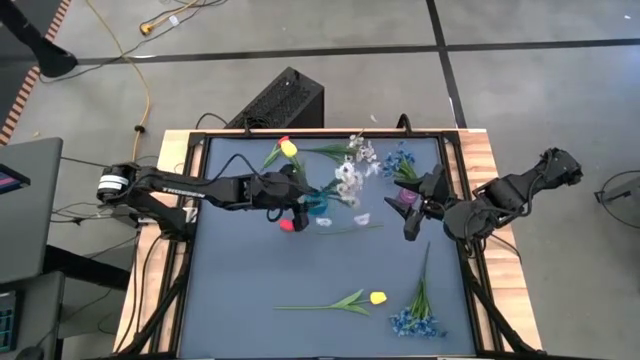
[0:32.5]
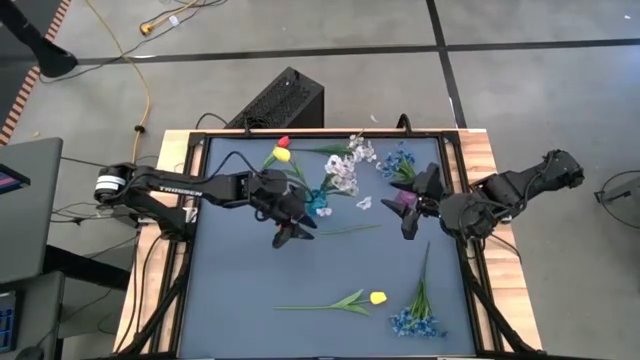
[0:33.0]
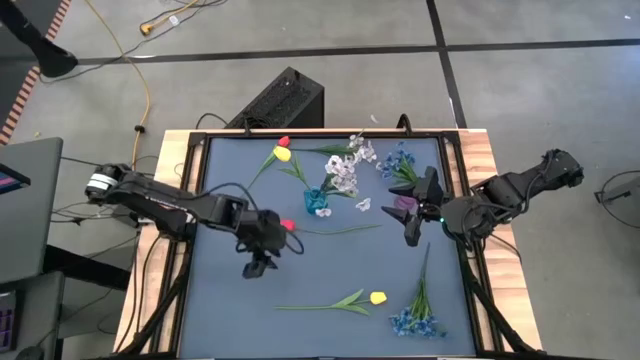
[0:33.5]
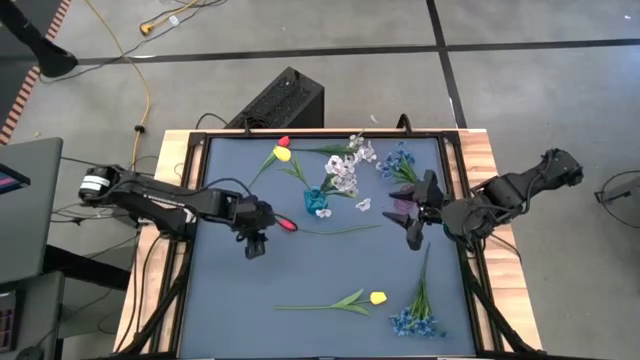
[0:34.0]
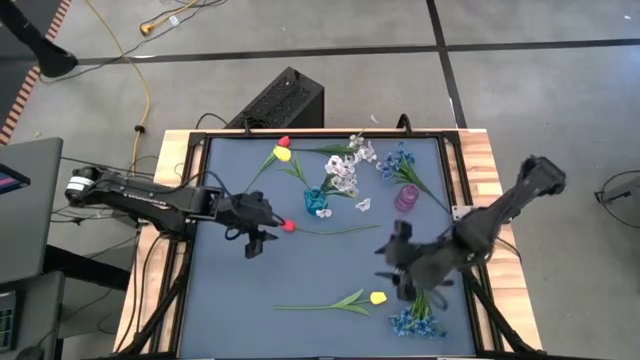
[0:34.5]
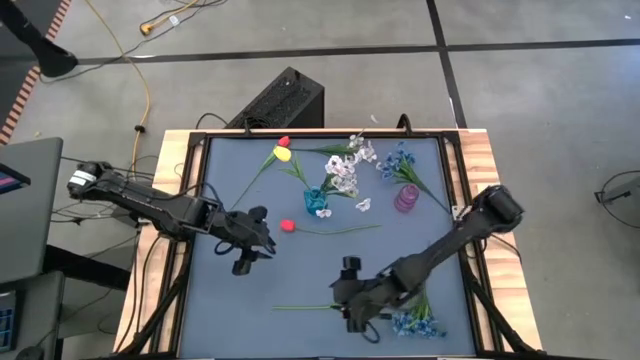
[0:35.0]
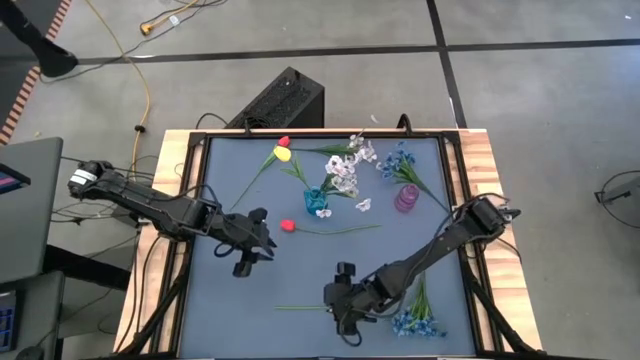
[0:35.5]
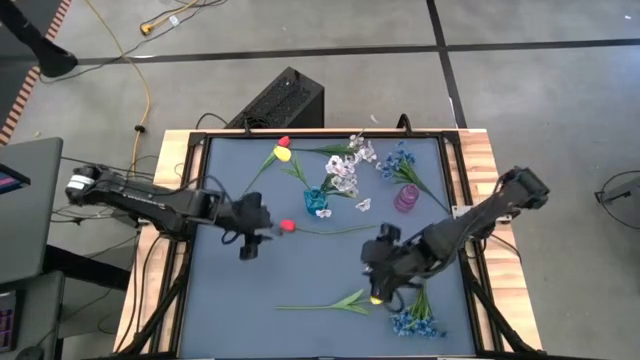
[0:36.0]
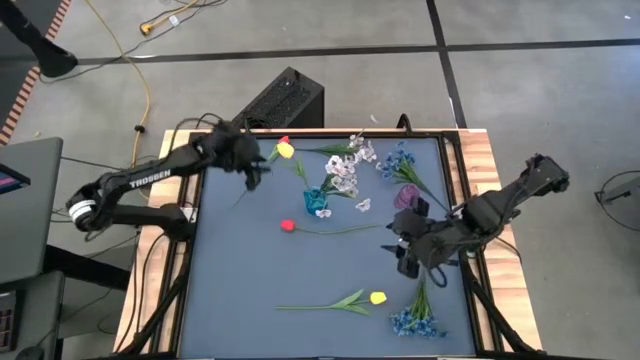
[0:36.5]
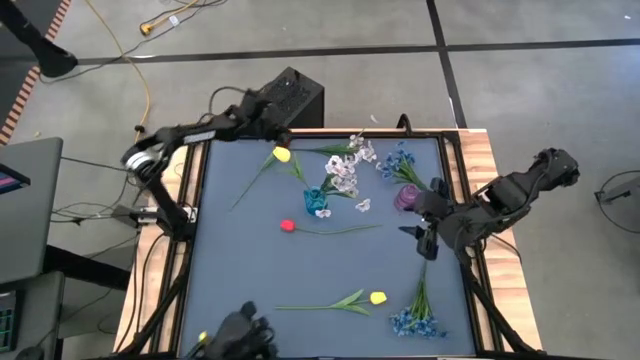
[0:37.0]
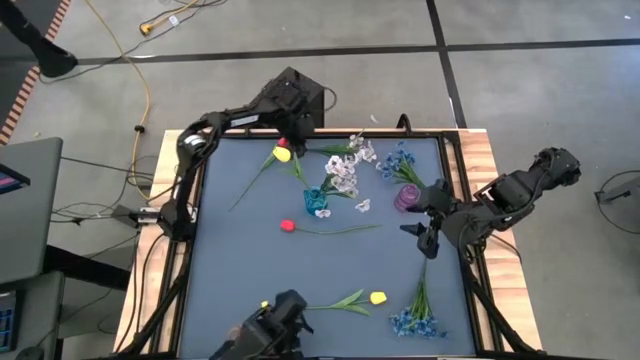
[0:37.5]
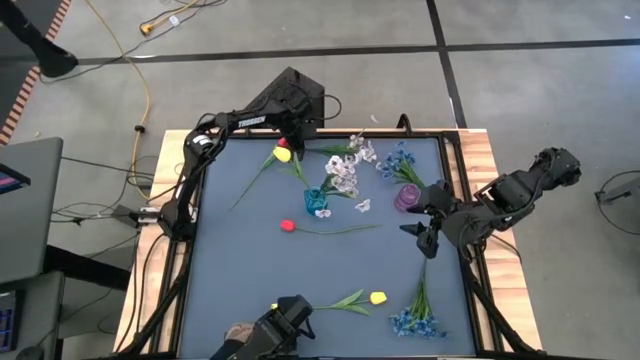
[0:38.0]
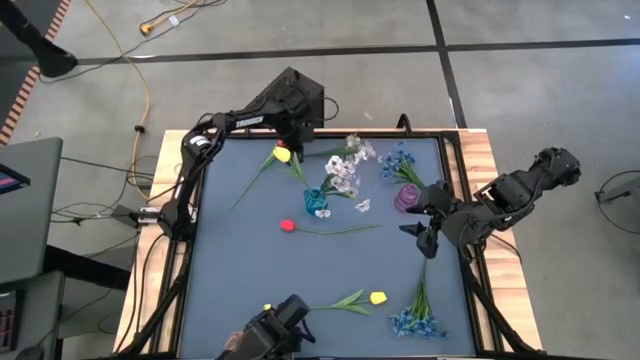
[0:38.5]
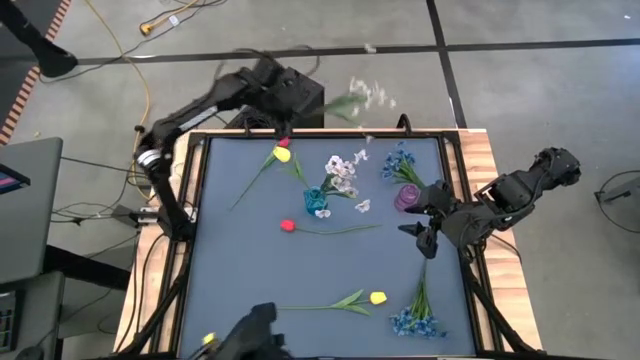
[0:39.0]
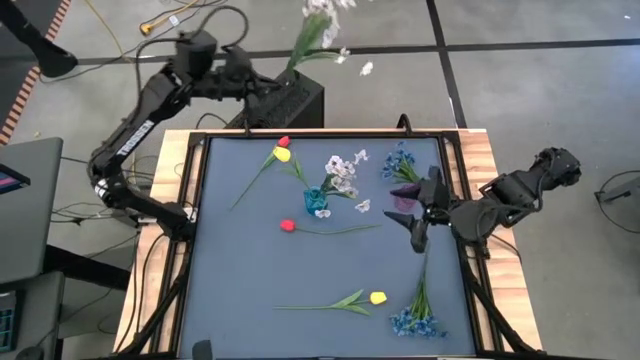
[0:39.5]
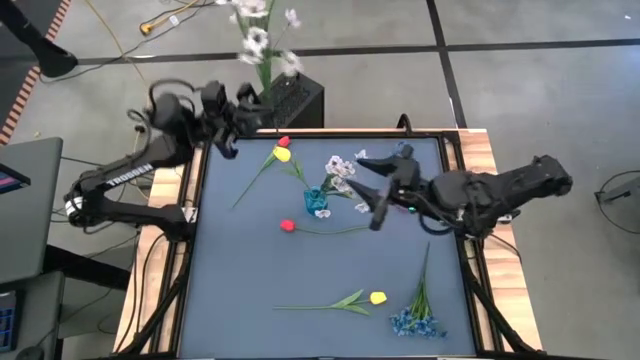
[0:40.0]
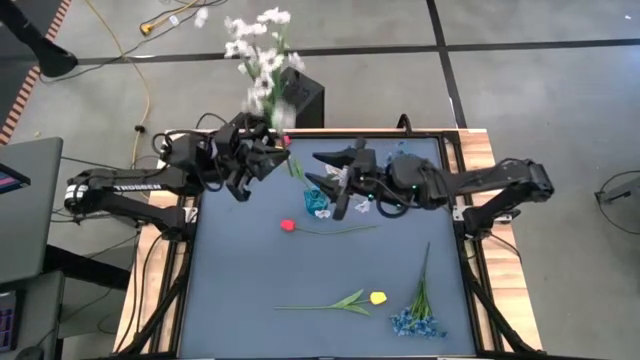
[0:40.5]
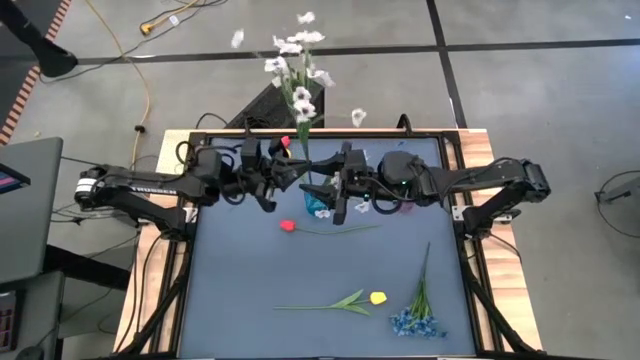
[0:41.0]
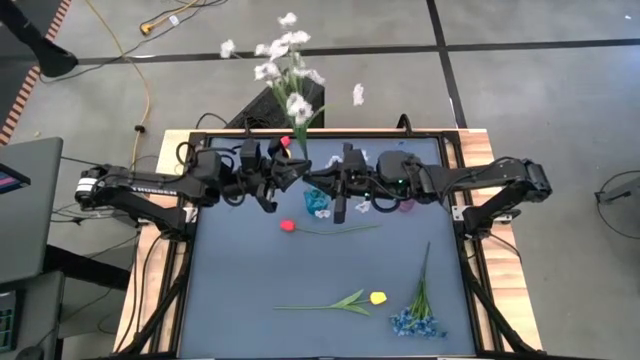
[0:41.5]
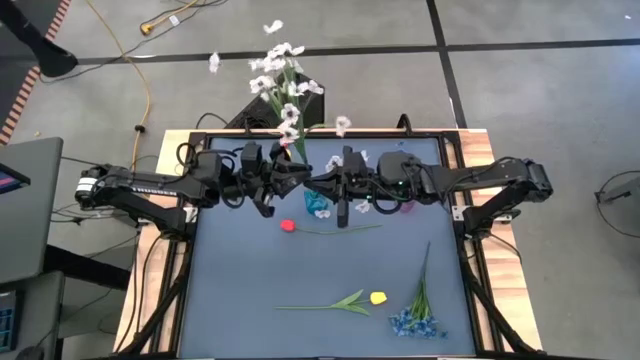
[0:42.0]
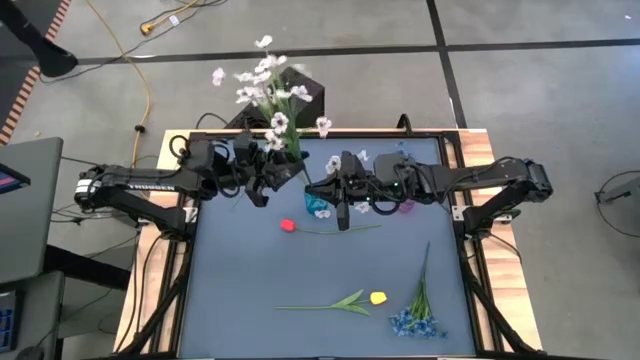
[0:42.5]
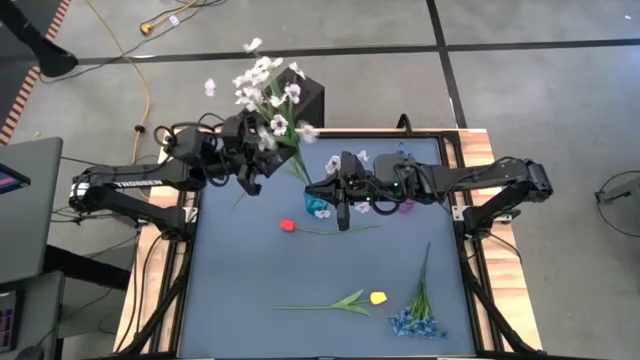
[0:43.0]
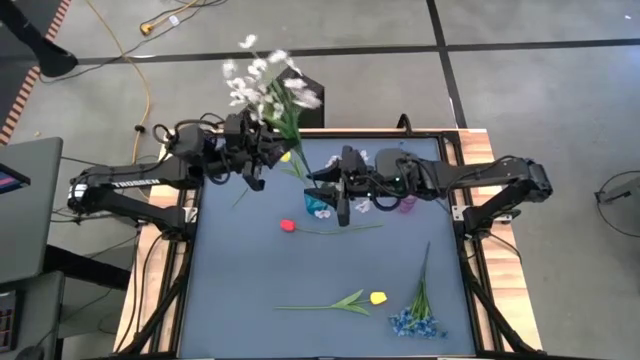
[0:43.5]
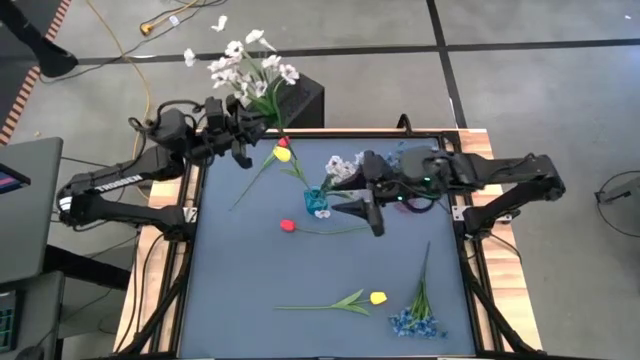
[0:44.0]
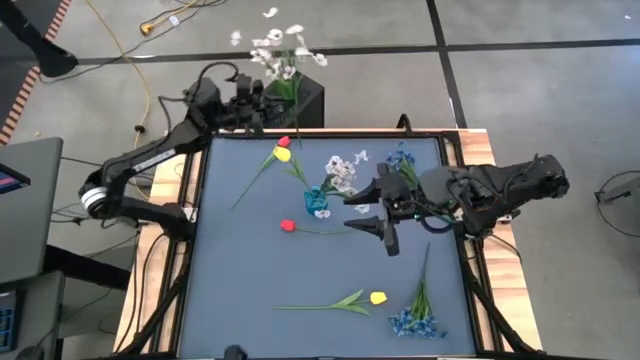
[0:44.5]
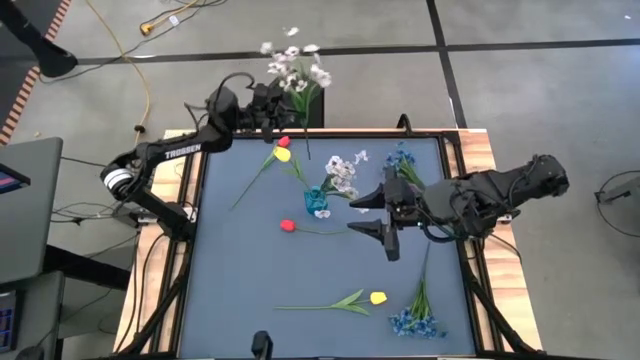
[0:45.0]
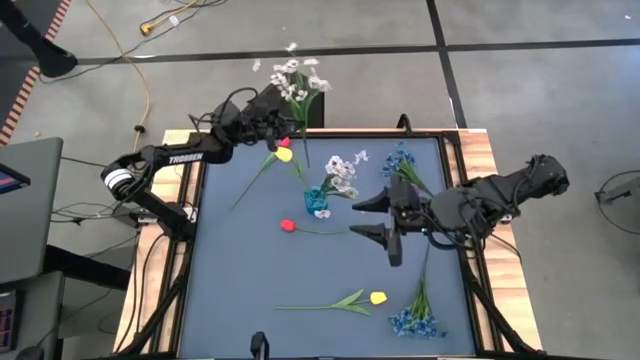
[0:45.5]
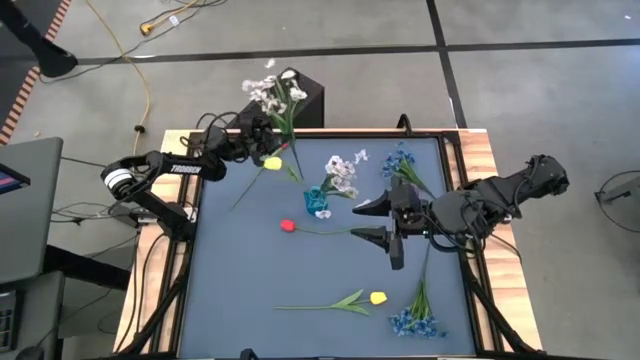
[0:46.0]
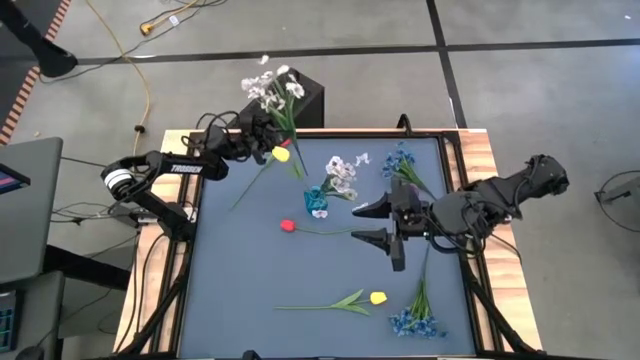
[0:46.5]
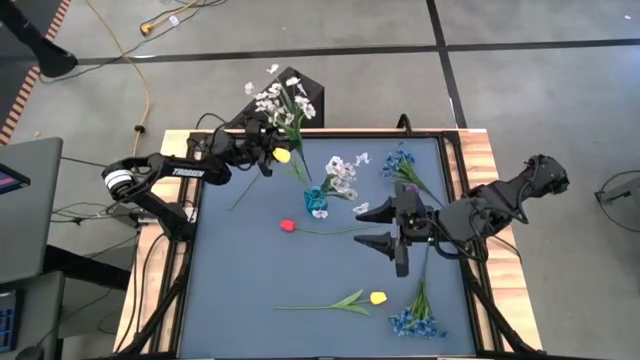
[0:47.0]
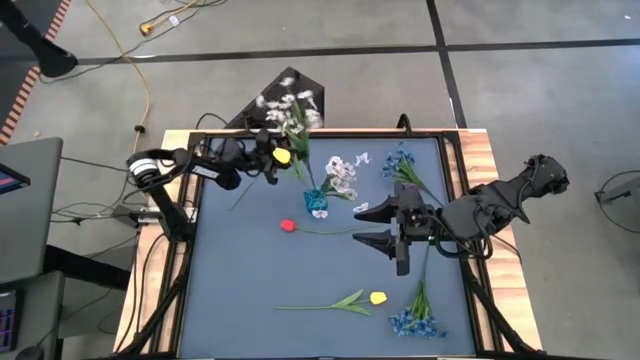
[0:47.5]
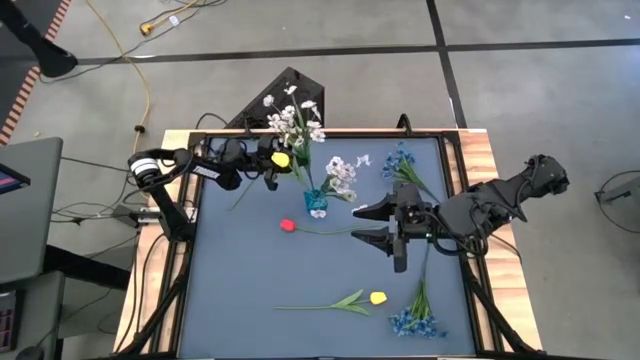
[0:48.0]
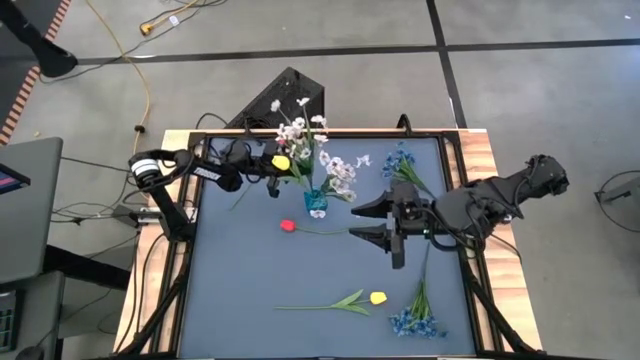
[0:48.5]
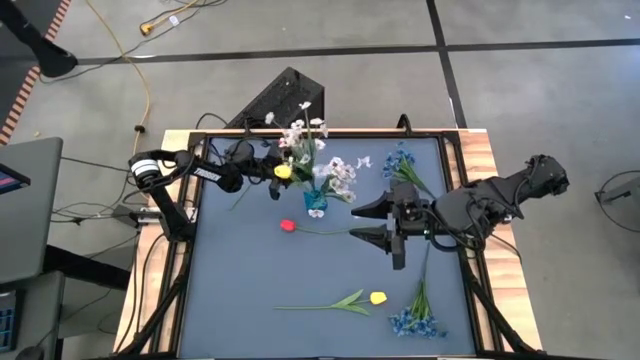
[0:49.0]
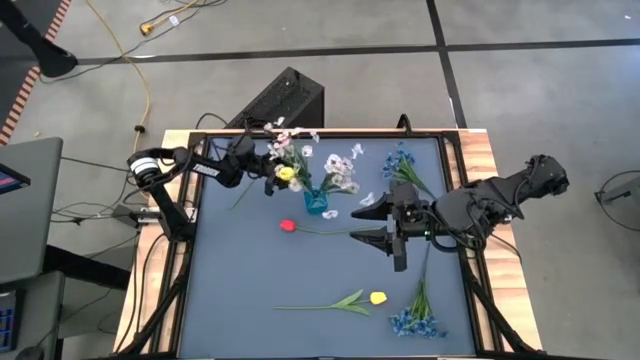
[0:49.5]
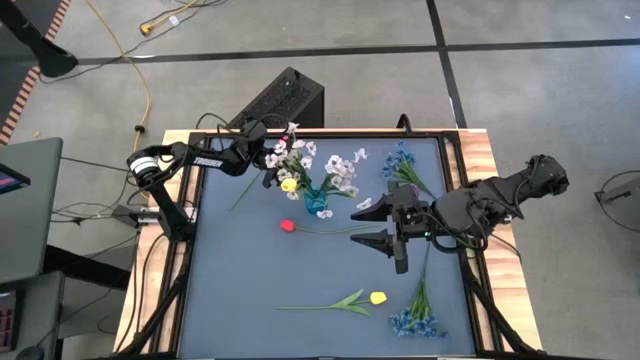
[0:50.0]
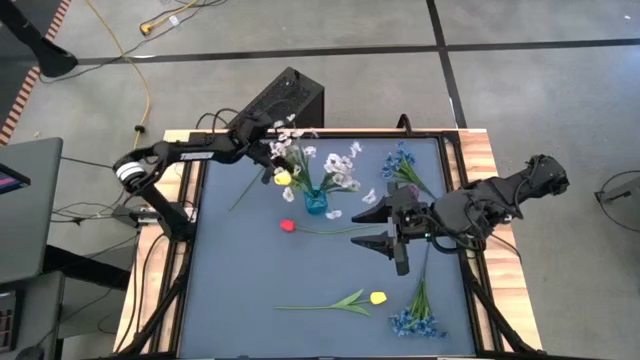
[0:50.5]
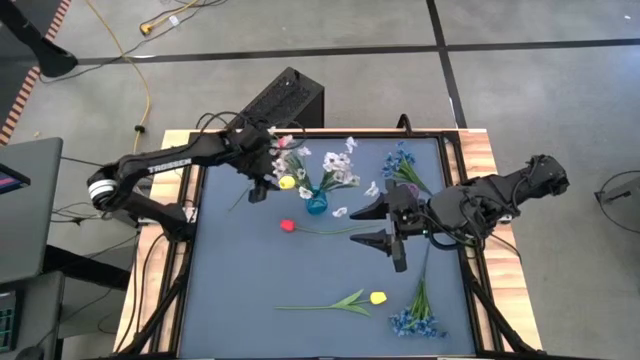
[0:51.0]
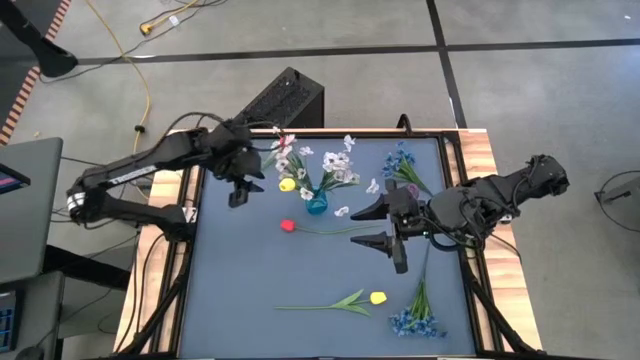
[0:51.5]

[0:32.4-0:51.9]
Task: Sort flowers into vase by color
Put the white flowers into the blue vase
